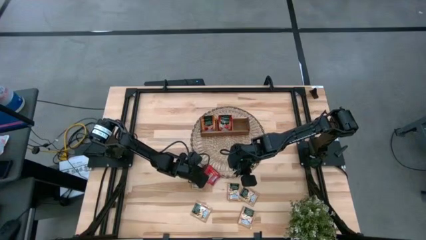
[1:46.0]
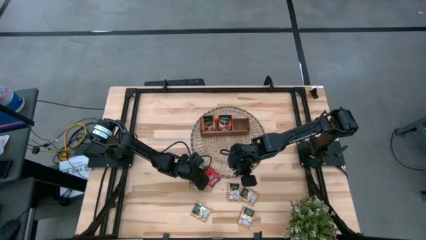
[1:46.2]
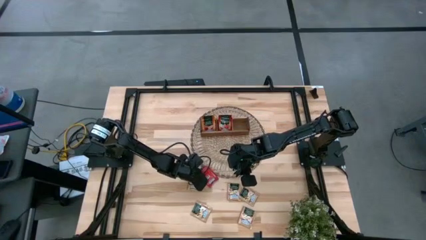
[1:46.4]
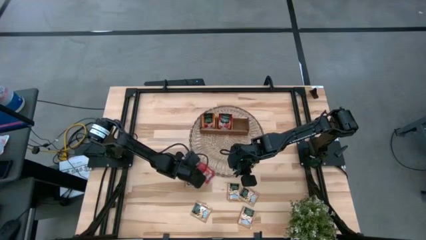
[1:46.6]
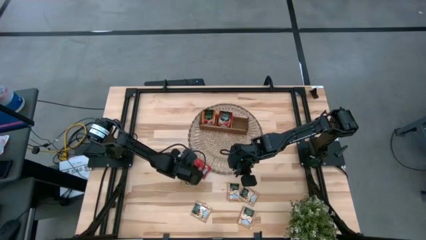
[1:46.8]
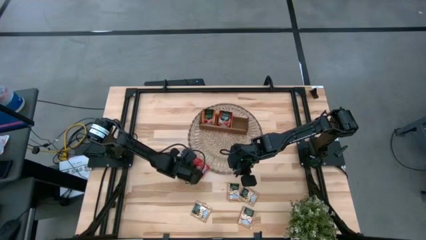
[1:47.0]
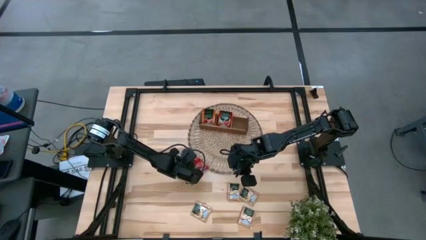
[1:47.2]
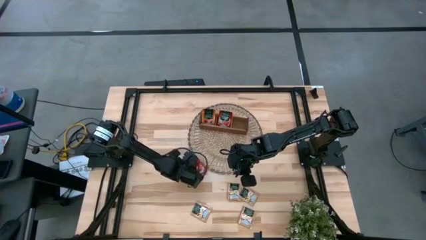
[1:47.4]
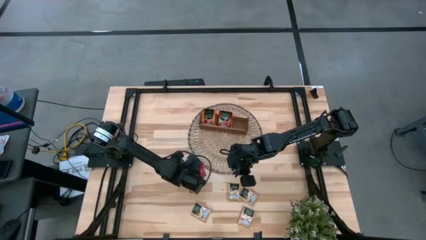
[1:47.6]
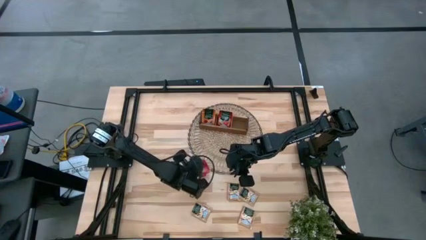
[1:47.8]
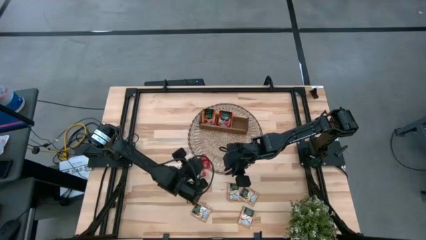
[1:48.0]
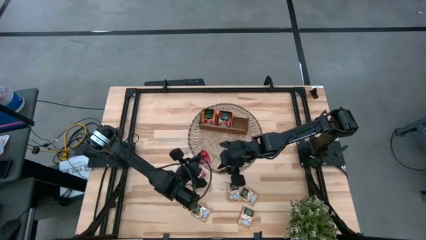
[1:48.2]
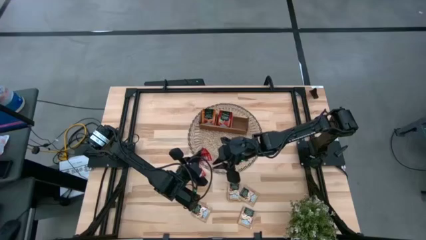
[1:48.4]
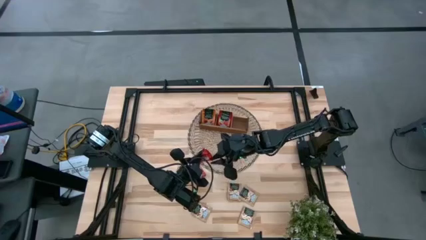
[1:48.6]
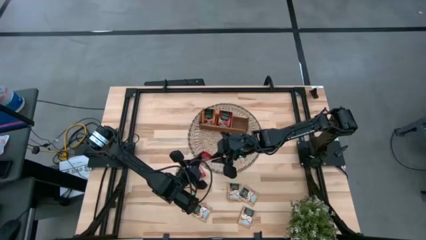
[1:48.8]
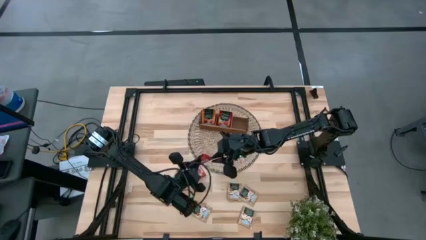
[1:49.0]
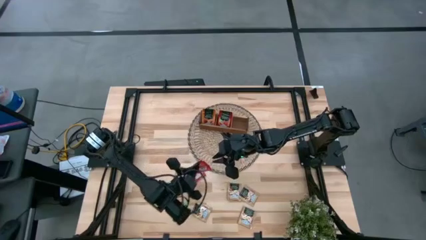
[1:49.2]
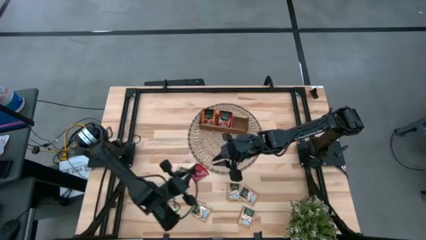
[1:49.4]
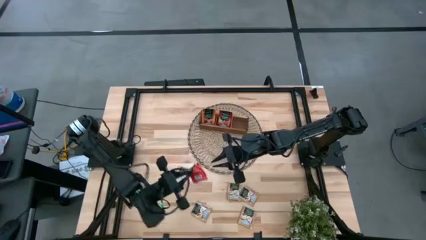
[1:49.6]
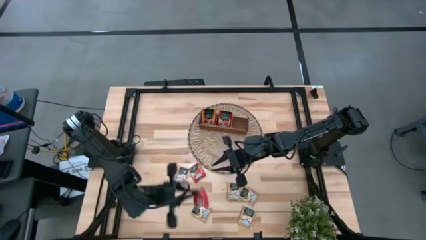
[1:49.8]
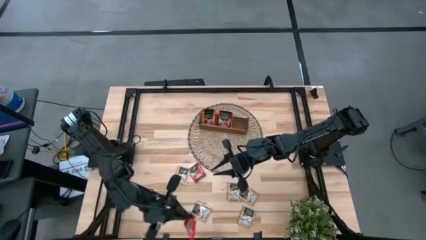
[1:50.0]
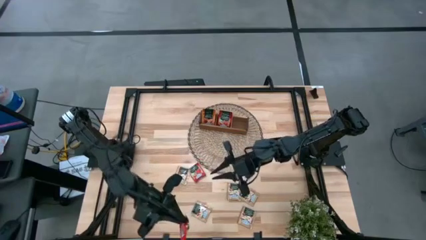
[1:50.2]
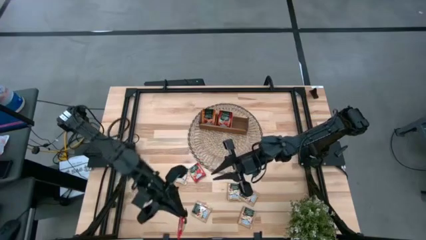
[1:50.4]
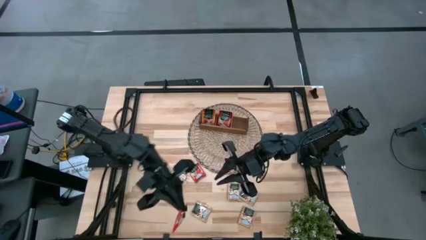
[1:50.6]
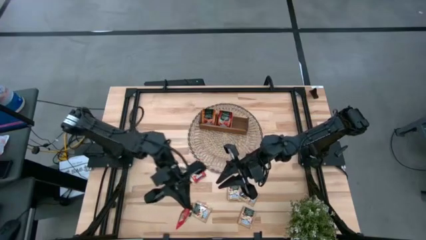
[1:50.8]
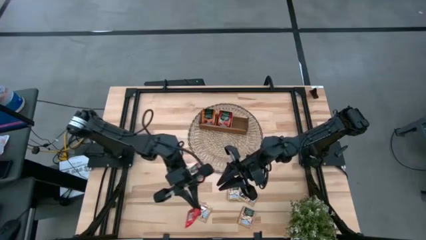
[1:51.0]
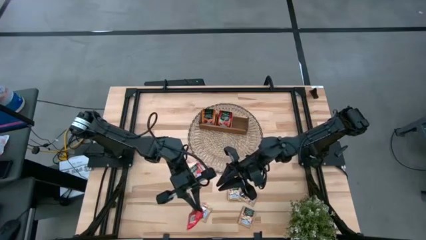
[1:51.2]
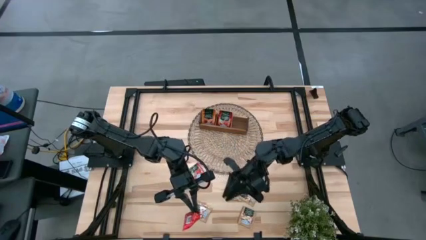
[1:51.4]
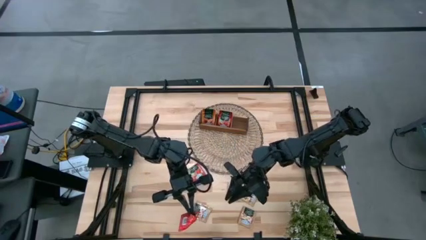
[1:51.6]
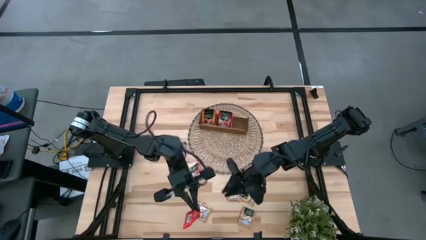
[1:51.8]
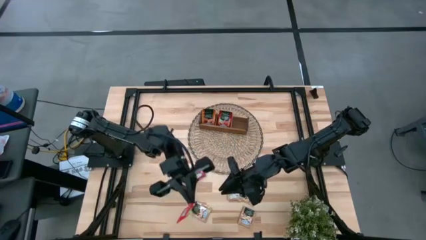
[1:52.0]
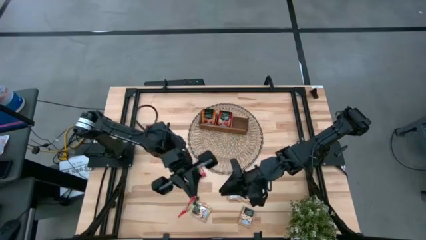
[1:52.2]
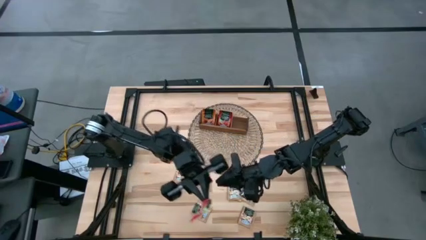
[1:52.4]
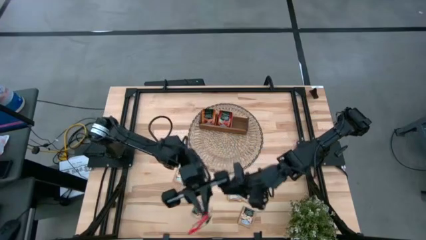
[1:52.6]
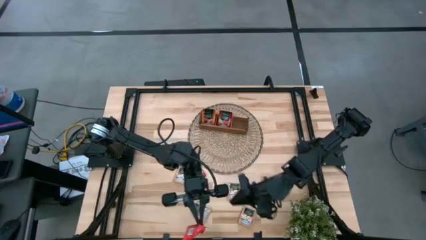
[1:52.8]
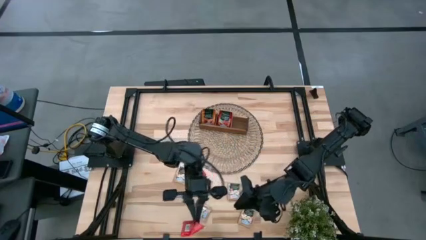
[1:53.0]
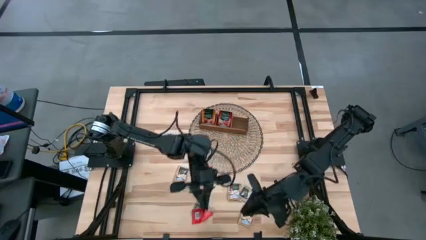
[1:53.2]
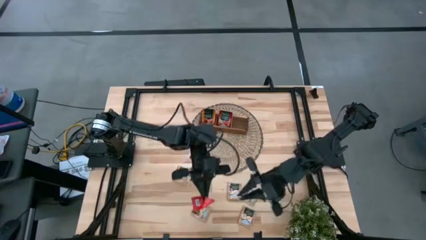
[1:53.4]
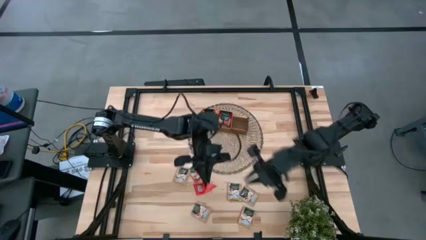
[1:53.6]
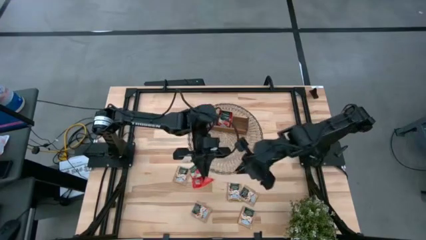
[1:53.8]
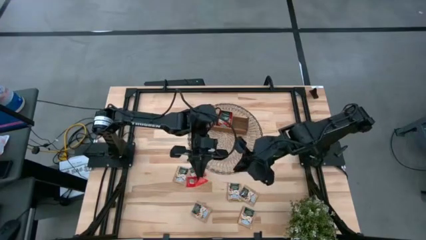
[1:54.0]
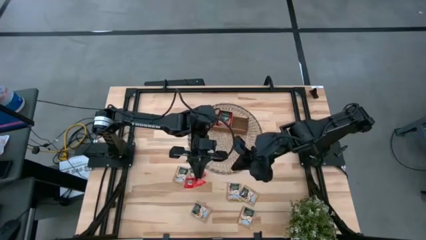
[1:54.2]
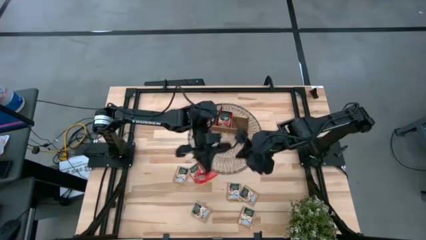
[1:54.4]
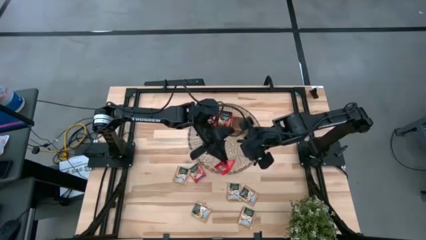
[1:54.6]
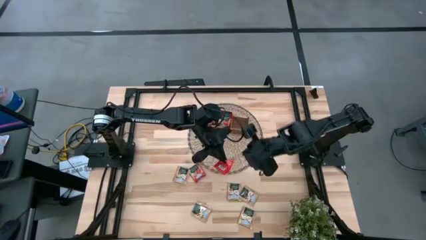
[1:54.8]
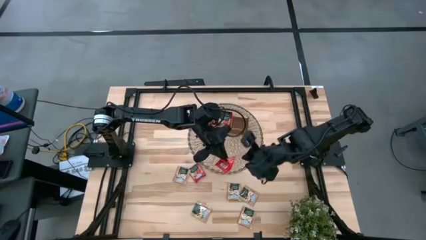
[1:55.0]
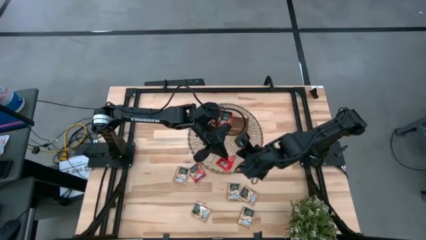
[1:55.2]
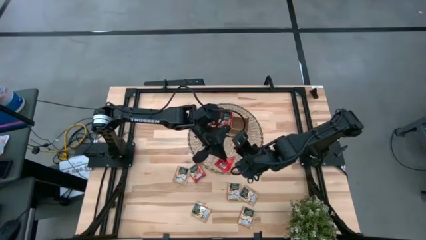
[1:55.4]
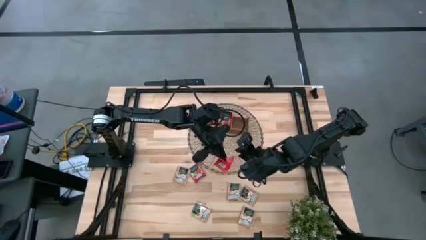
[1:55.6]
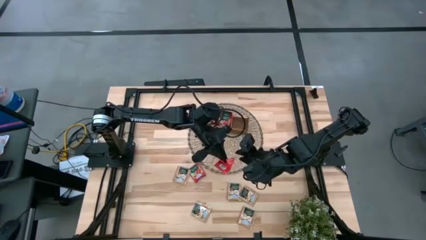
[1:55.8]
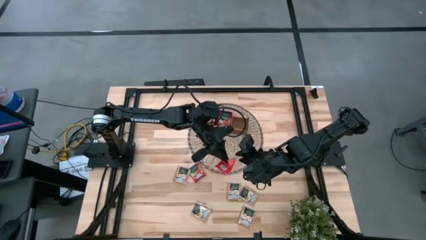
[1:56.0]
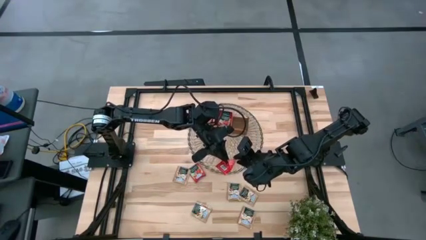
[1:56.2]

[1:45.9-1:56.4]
Task: Pick & Place Tea
Put the red tea bag into the middle section of the wooden organizer

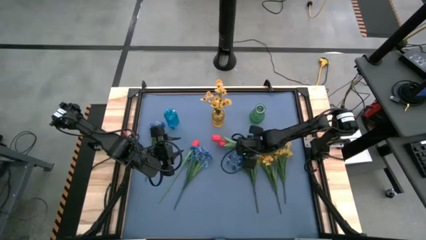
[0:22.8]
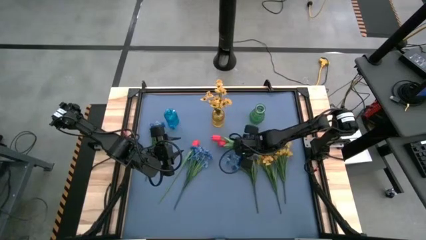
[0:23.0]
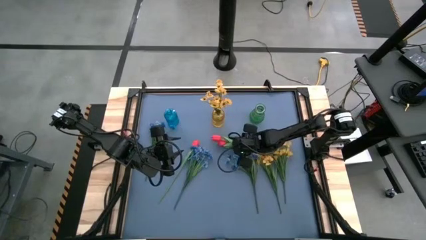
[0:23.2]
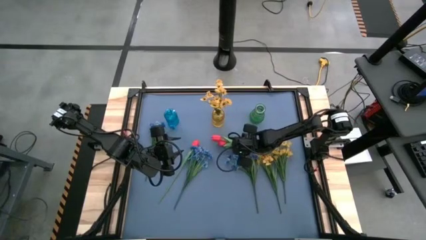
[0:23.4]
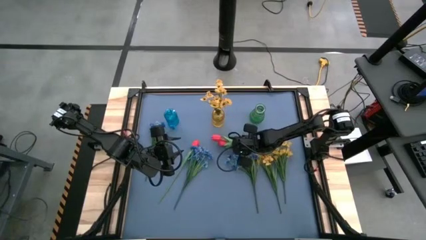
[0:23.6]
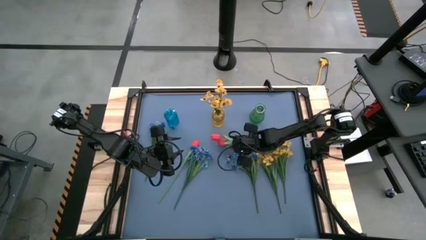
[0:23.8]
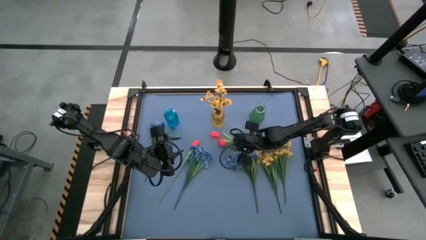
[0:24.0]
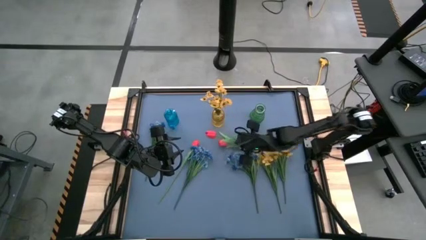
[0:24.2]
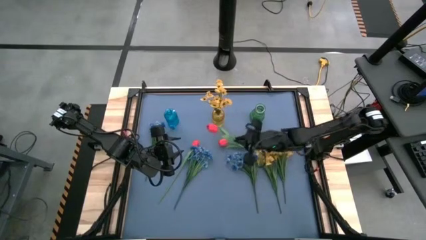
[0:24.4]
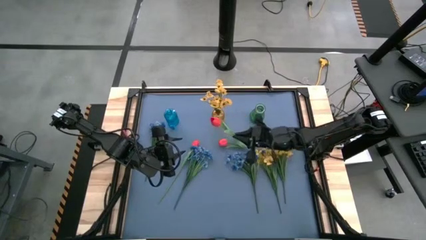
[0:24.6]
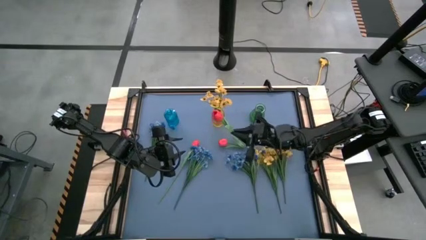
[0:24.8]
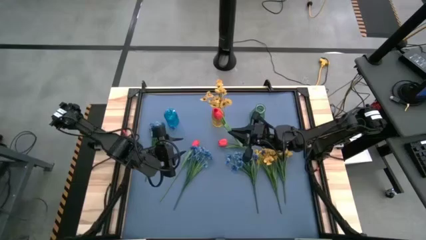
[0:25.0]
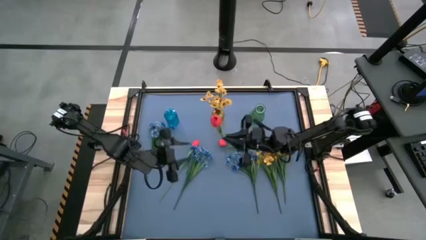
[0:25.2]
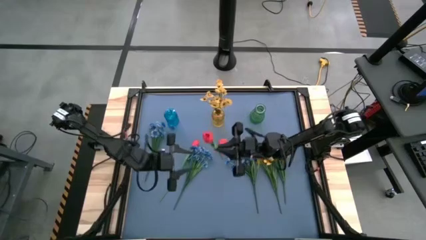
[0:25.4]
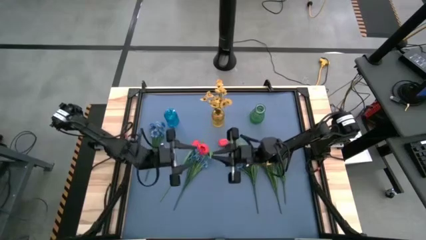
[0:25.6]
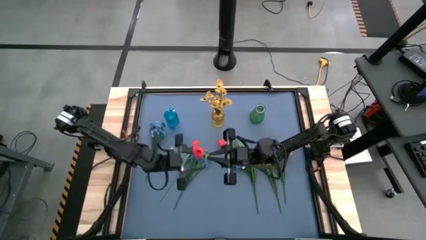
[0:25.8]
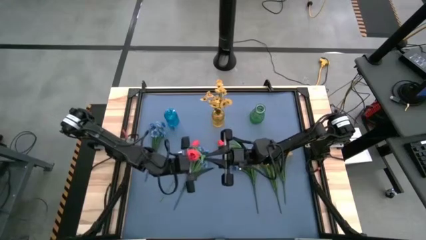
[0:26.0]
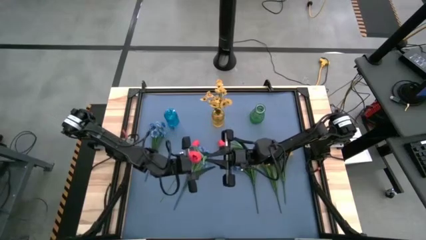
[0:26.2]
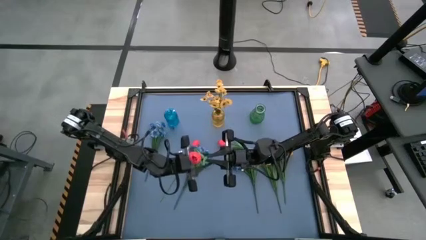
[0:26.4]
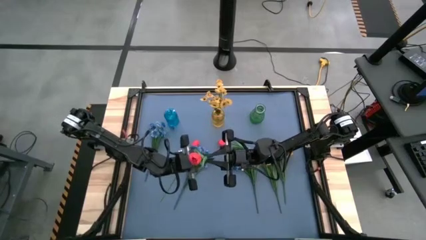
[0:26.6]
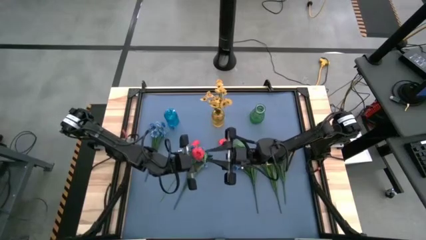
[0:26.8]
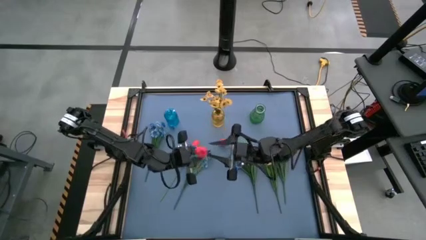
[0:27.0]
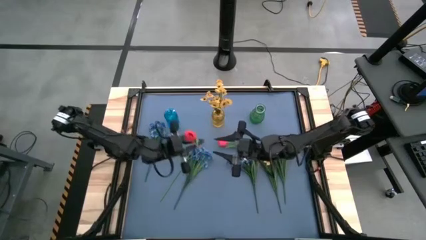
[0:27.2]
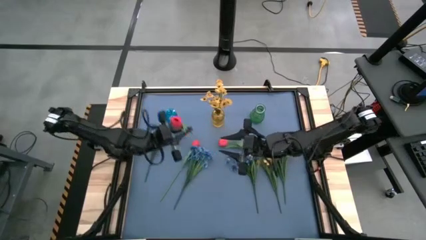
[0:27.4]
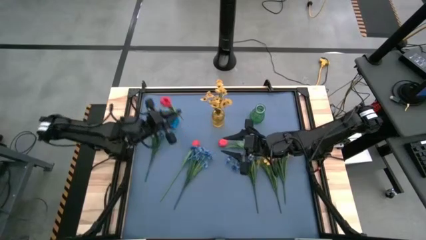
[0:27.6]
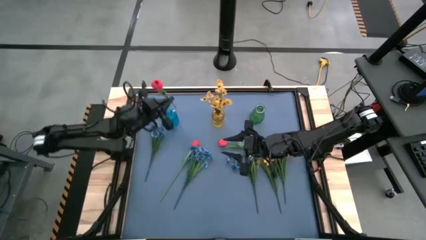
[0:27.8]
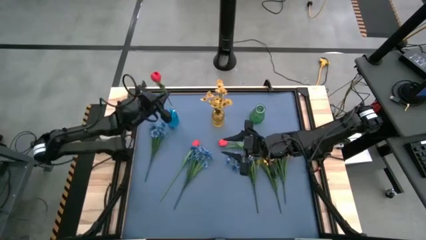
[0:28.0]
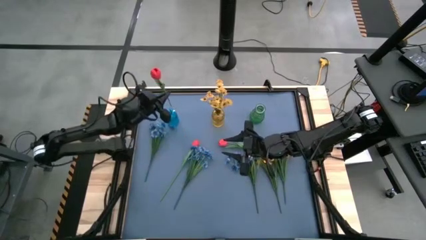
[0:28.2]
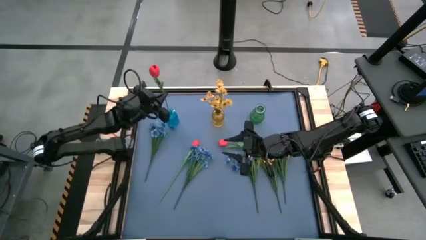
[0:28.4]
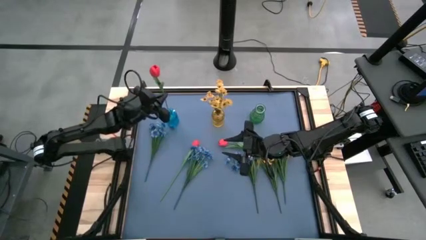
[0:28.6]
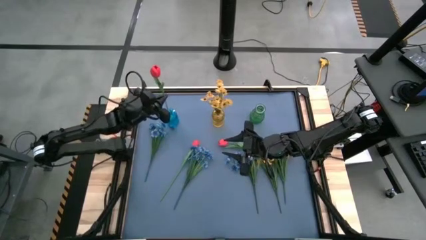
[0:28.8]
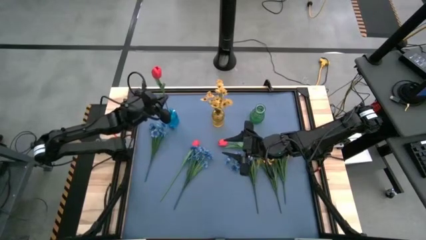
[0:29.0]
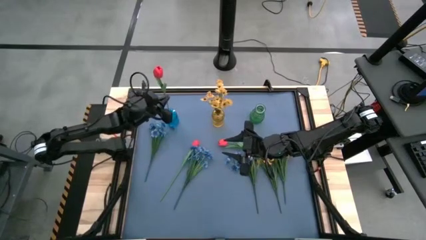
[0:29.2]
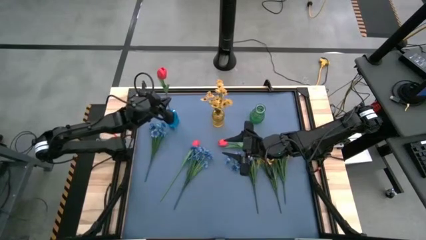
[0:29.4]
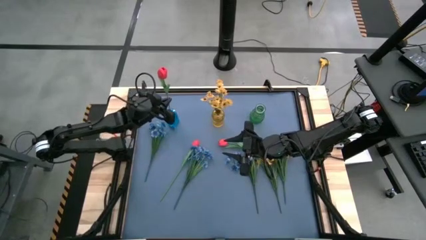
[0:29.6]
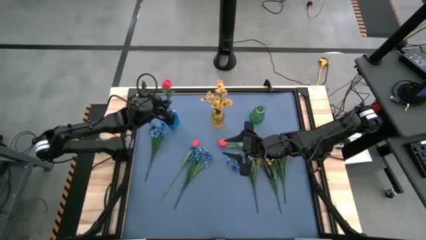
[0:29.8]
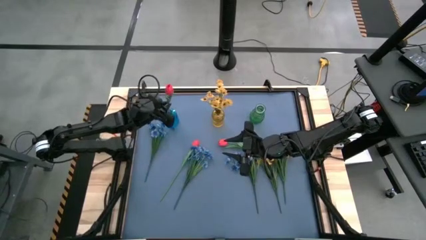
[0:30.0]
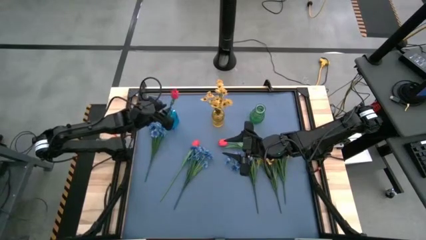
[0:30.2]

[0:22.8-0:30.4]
Task: Sort flowers into vase by color
Put the top left red tulip into the blue vase
